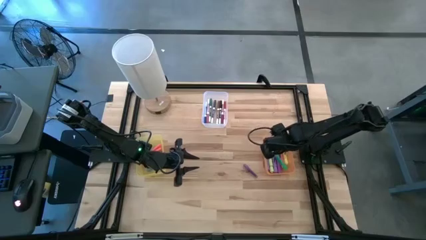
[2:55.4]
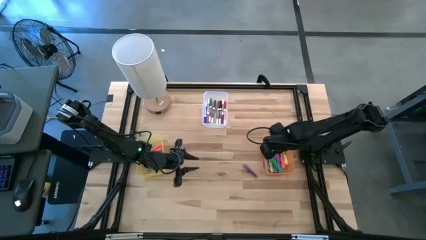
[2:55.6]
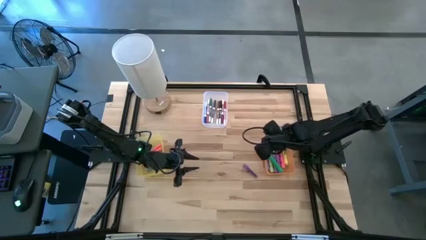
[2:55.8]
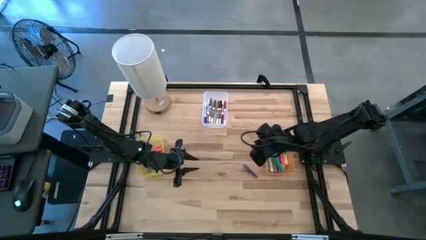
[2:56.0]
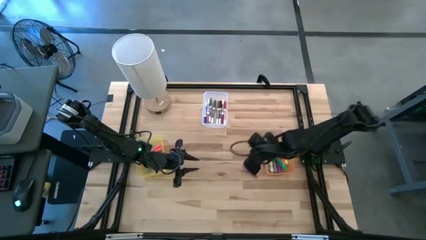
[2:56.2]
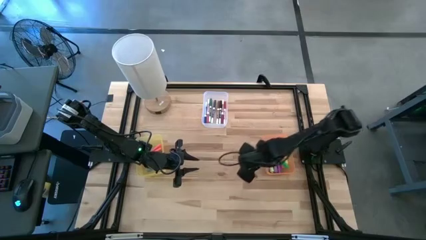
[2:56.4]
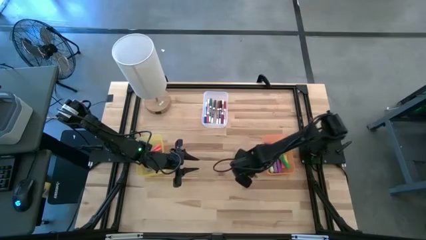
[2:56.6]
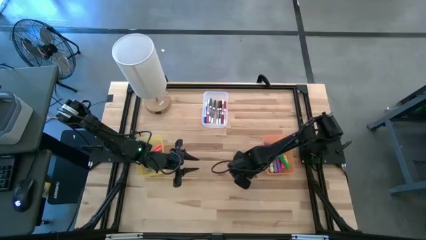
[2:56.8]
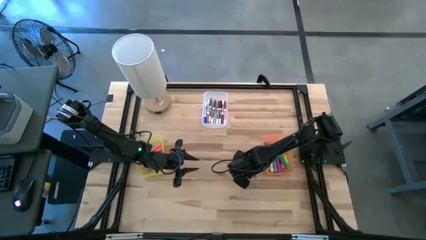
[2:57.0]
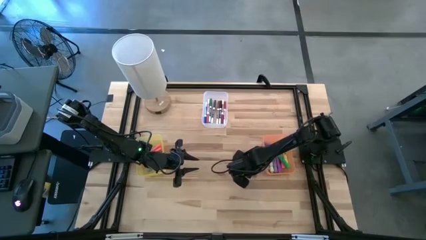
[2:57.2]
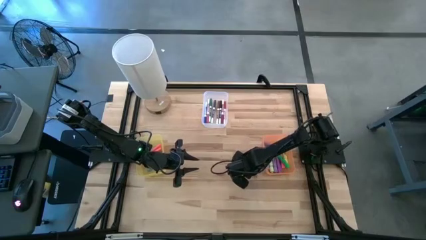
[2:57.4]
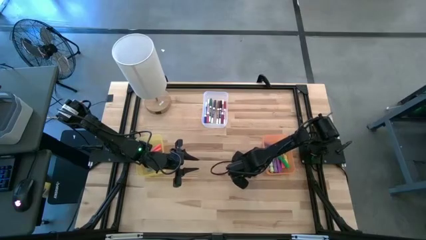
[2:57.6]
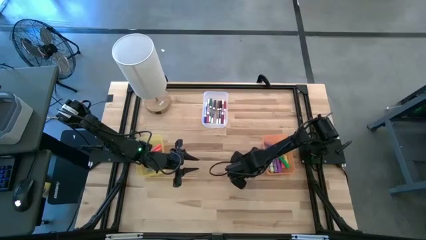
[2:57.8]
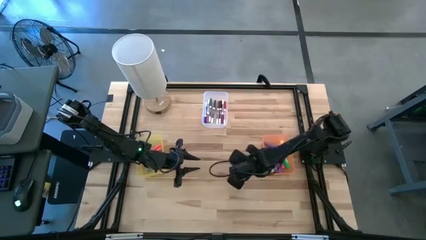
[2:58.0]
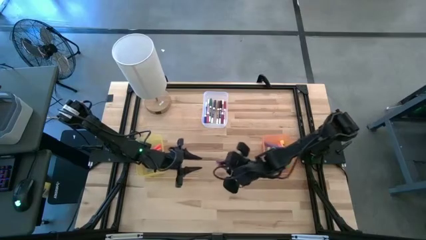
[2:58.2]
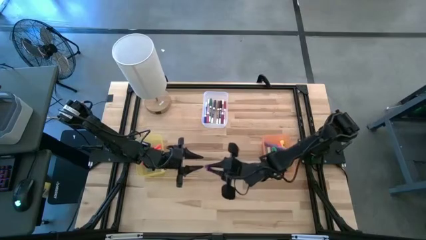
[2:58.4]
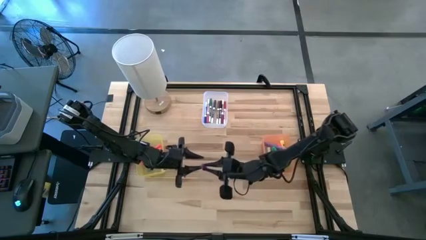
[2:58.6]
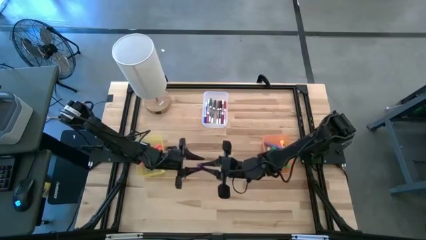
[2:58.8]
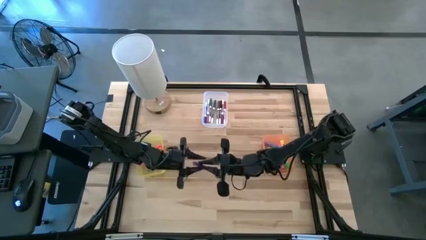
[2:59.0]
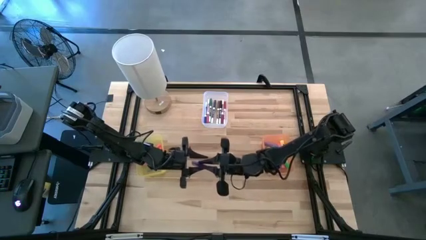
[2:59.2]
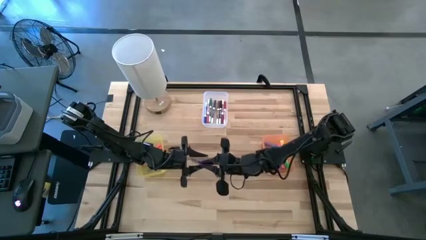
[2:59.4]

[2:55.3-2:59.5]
Task: Pick & Place Markers
Put the purple pen into the yellow bin

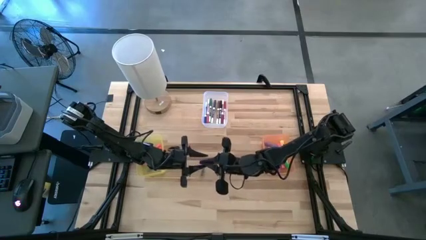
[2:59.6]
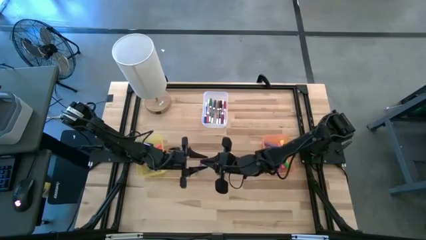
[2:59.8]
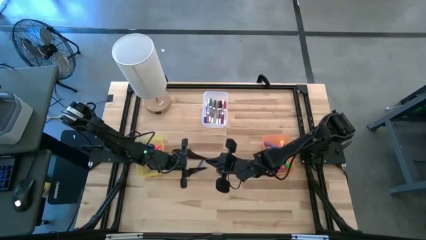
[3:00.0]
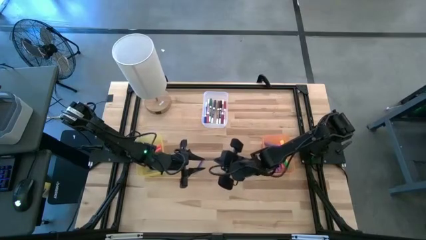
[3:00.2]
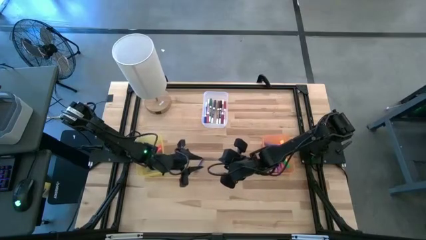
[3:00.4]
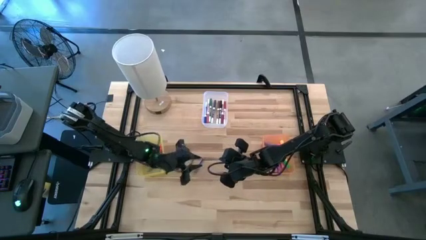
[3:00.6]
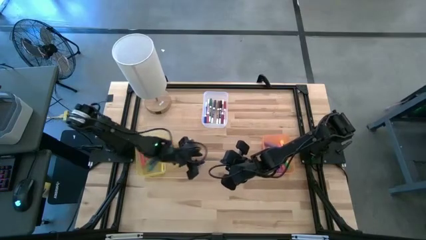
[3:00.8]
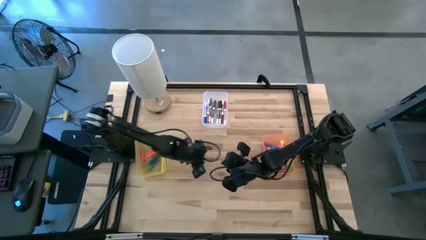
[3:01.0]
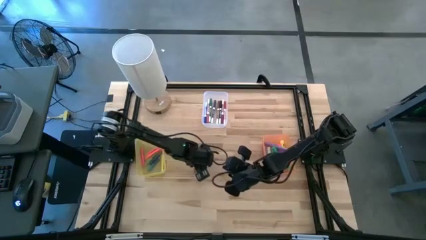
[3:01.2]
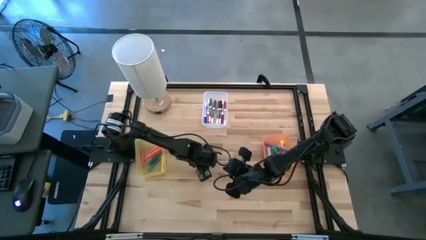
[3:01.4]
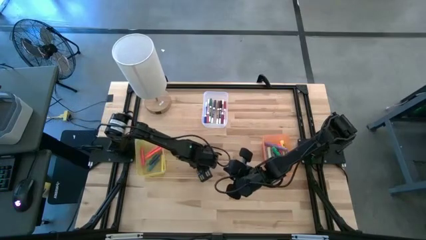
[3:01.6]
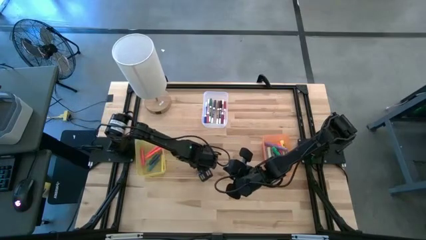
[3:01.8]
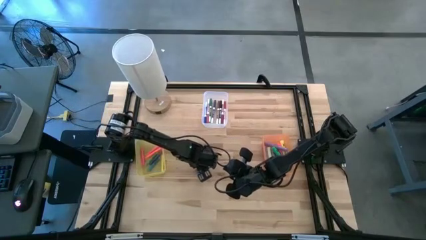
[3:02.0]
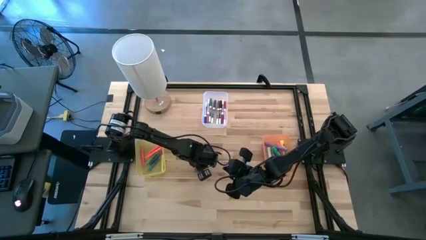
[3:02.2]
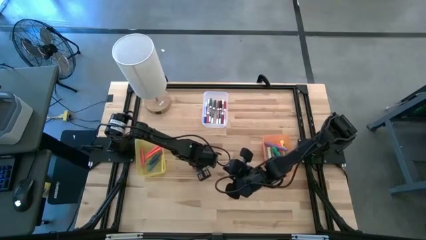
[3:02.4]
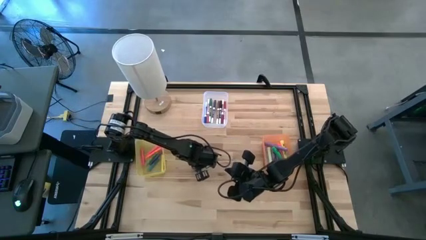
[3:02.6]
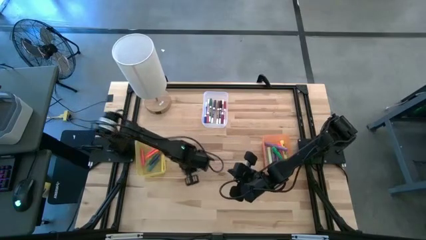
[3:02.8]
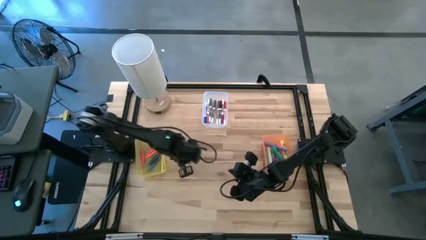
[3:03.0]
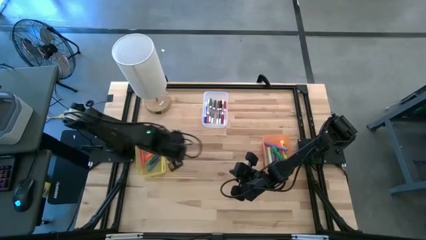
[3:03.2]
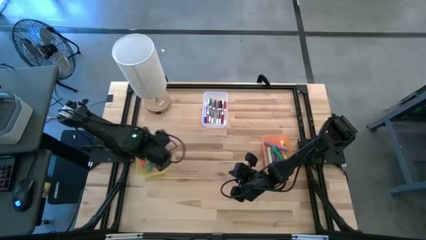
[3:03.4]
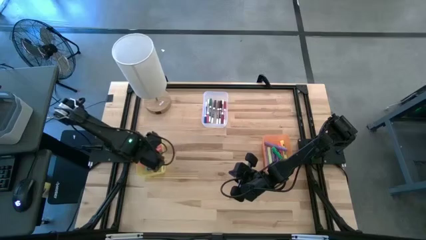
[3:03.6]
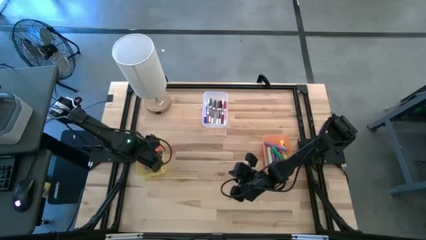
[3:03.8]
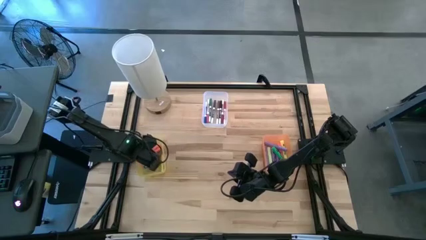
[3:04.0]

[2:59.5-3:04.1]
Put the purple pen into the yellow bin

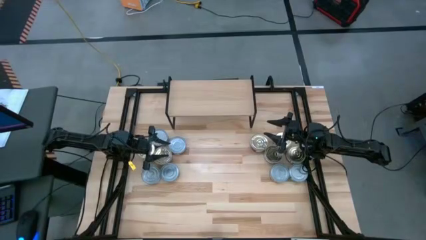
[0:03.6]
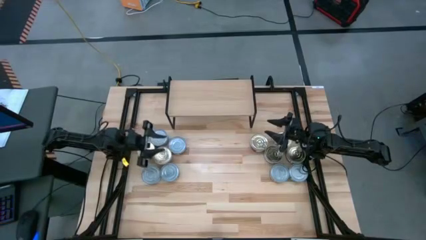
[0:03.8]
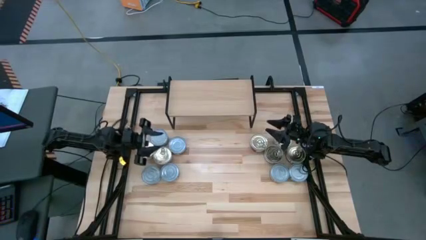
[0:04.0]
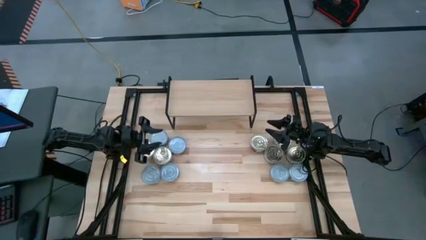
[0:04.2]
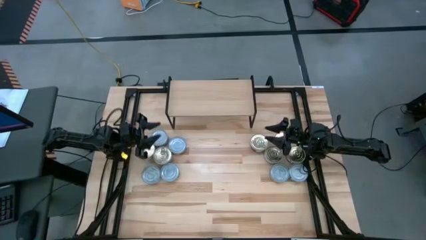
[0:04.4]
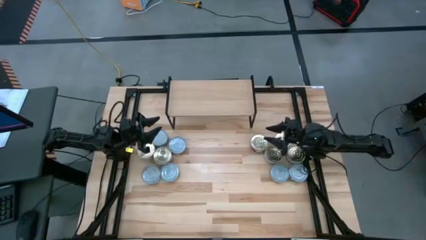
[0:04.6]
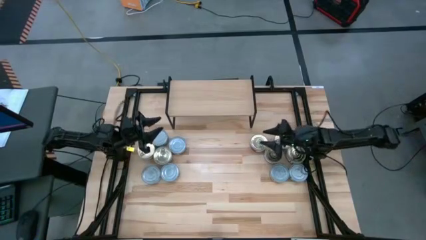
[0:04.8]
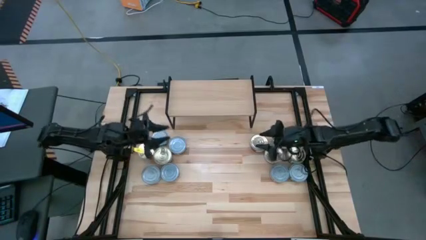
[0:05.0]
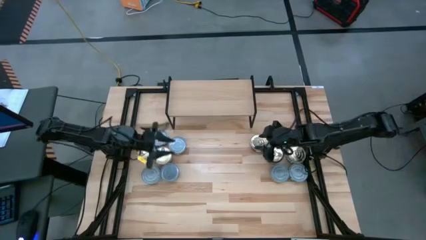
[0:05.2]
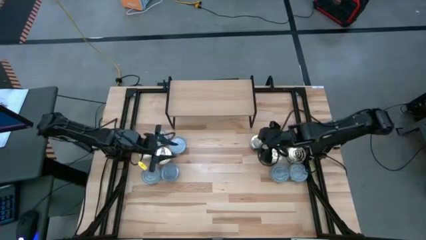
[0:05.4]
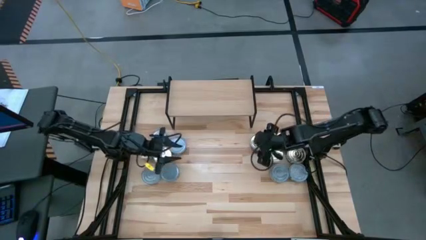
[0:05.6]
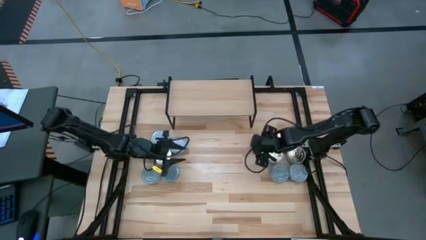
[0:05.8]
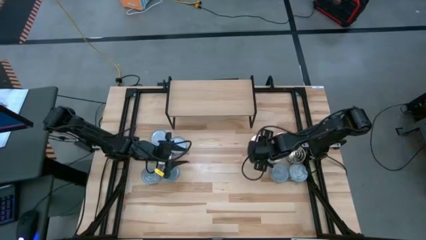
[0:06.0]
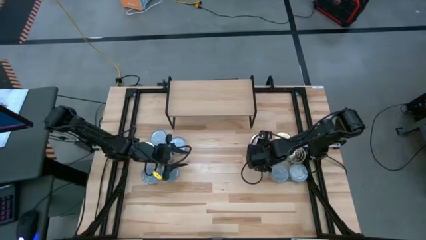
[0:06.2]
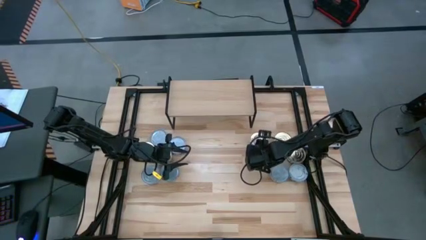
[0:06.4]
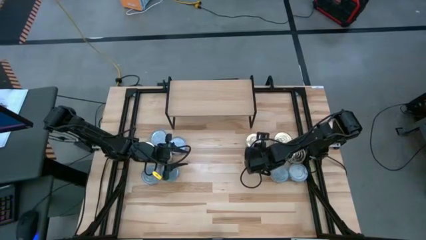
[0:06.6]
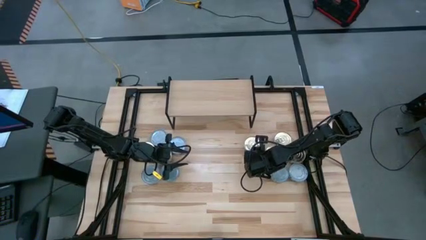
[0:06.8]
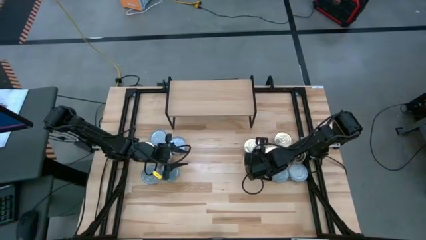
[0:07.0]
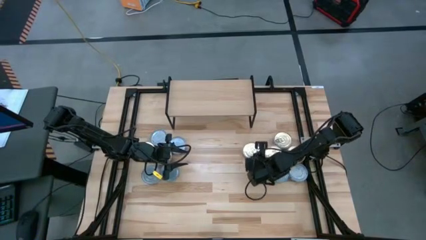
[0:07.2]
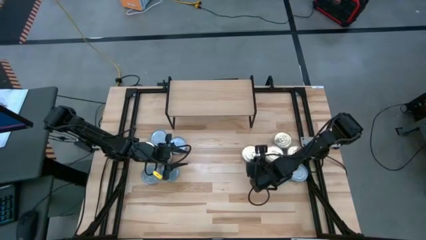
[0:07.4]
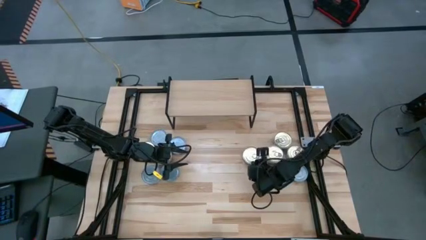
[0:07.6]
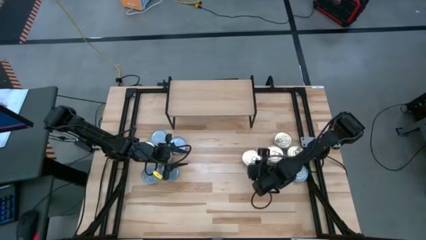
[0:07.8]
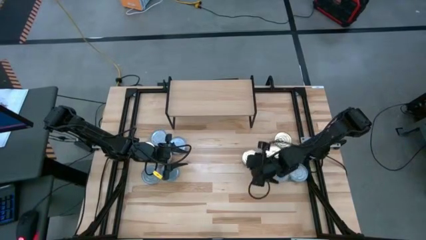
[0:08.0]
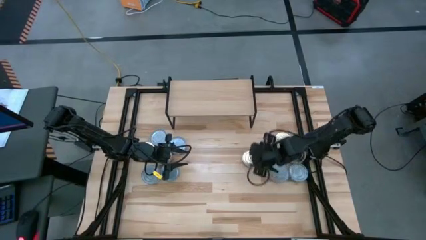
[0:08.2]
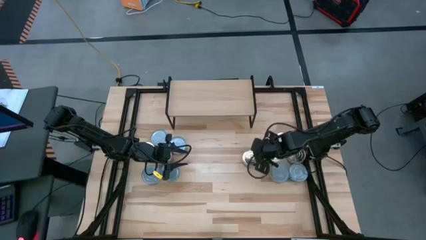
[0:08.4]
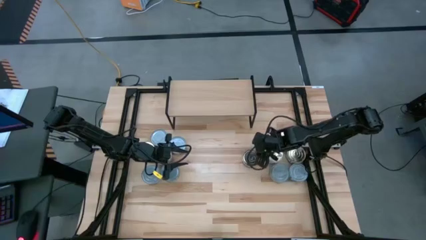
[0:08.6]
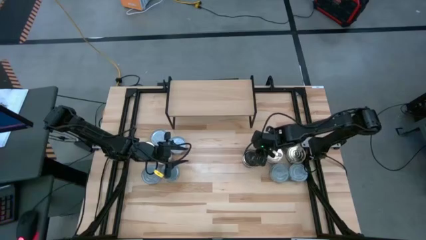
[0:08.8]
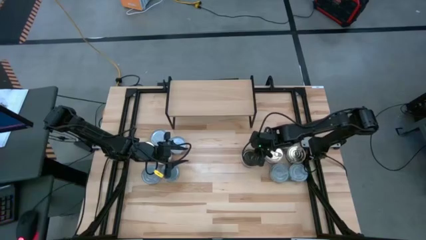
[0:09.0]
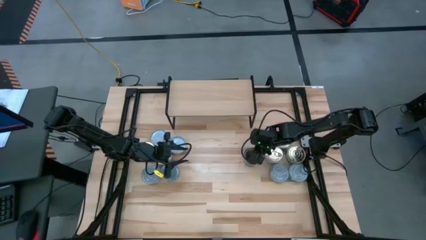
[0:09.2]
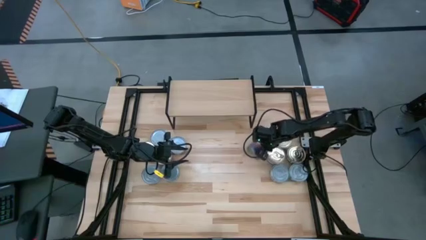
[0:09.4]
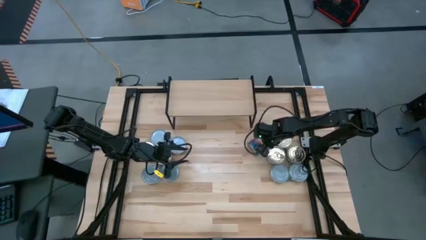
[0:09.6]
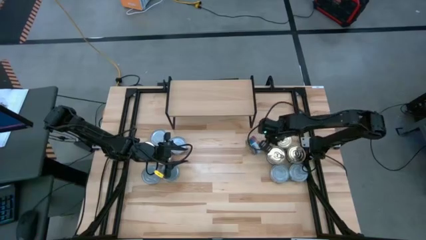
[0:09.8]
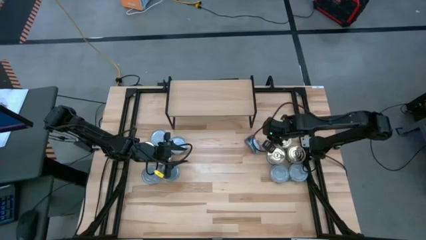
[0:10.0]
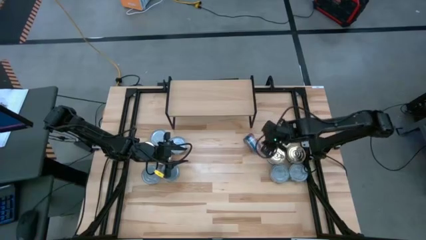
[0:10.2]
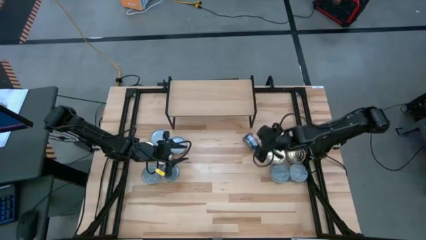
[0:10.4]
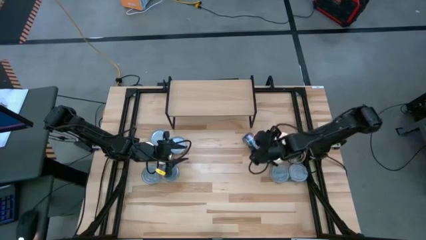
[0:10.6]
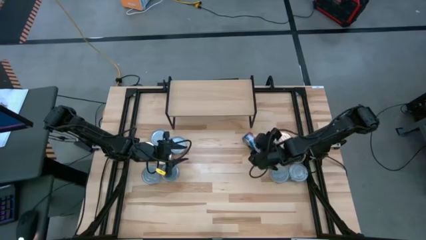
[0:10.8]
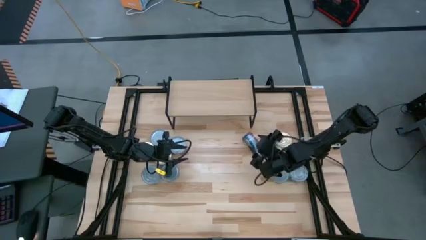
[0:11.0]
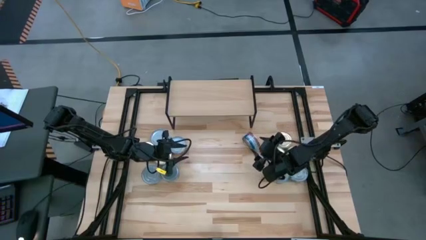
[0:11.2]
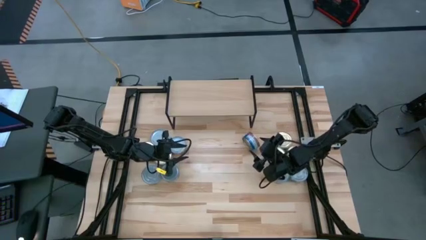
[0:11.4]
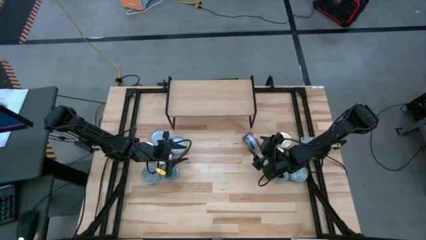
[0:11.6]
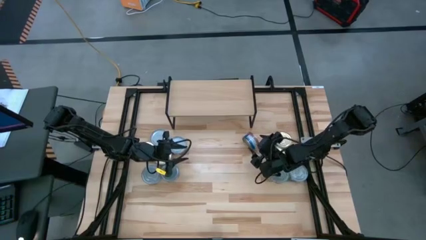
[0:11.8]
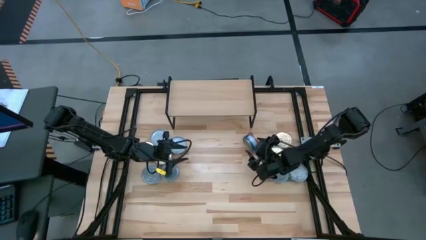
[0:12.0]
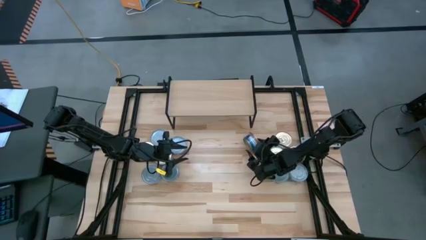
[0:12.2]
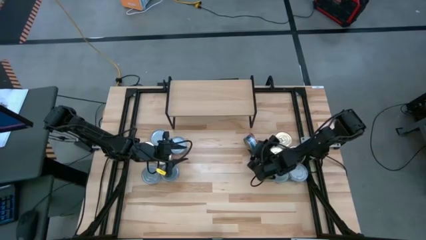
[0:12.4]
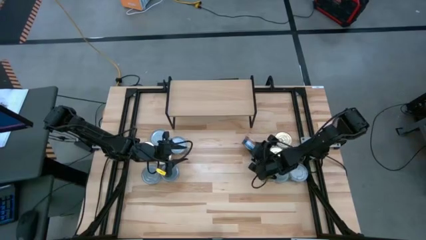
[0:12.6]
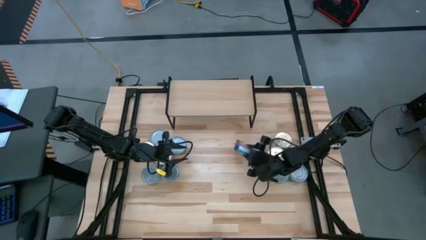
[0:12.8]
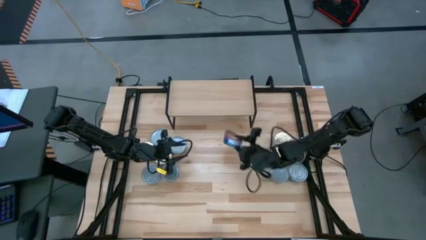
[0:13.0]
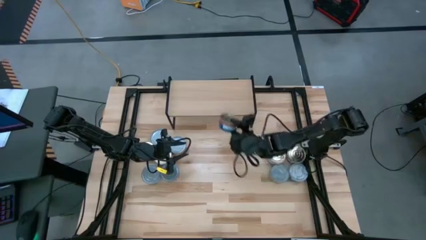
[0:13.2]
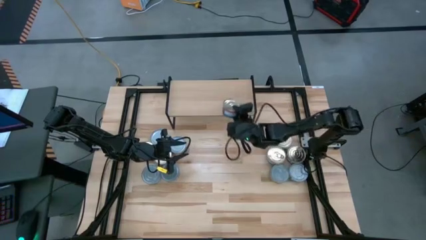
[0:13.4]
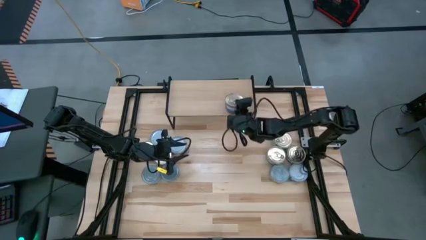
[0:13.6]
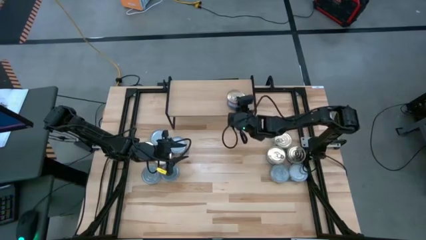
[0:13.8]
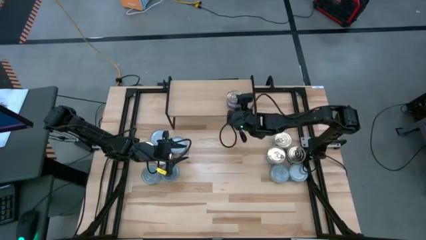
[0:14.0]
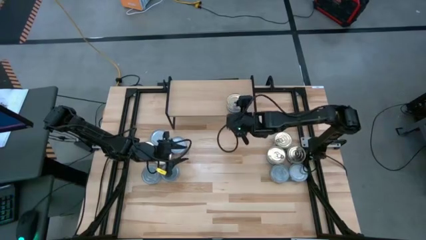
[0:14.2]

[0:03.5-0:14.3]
Task: Stack canned seafood by type on shelf
Put the pink and blue tuna on the shelf
